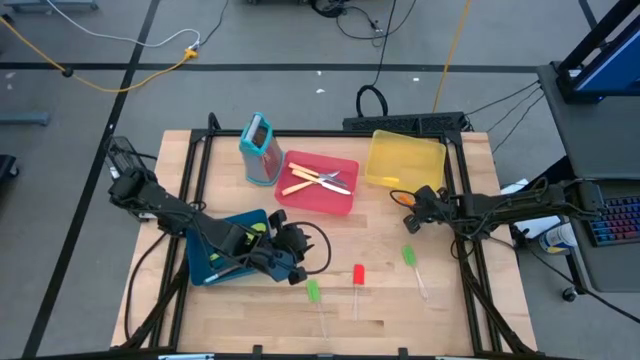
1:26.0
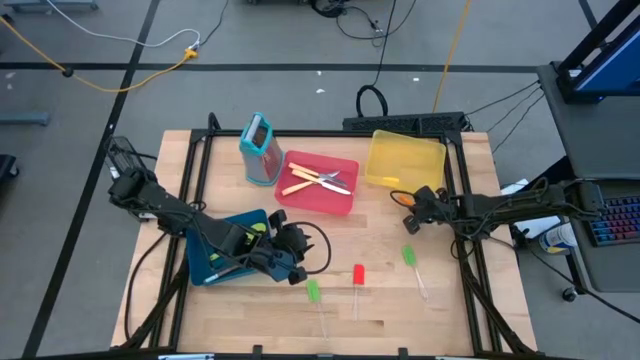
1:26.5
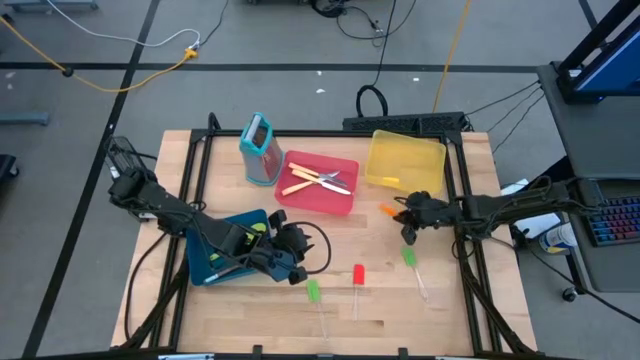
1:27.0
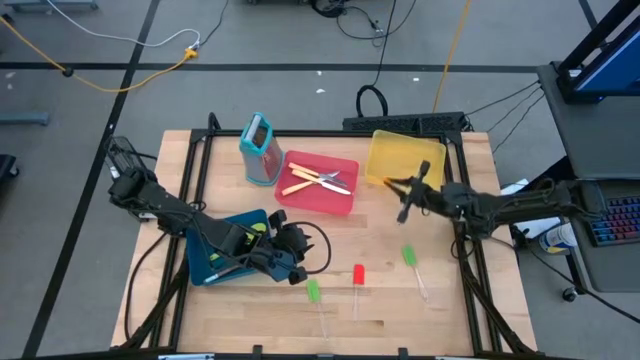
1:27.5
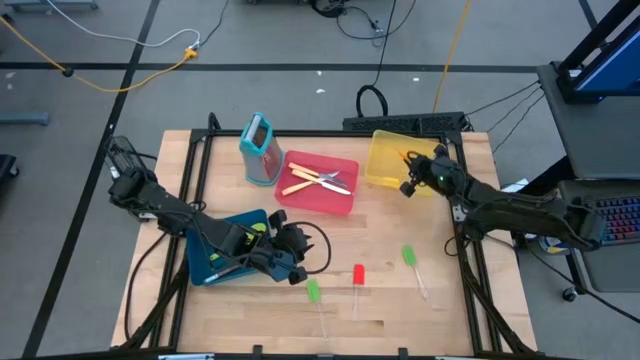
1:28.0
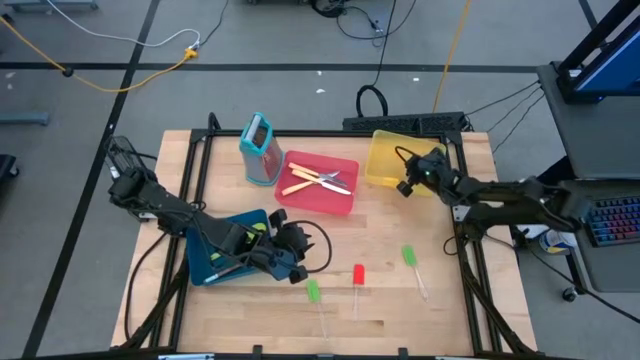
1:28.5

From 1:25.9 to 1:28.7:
Task: Pick & Place Kitchen Items
Put the orange spatula into the yellow bin

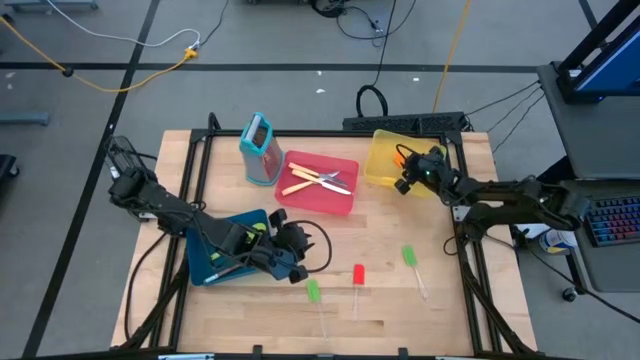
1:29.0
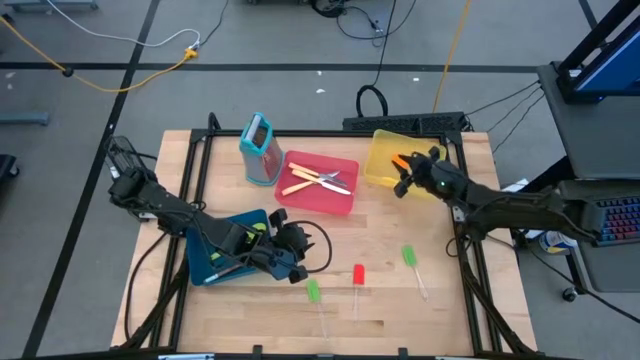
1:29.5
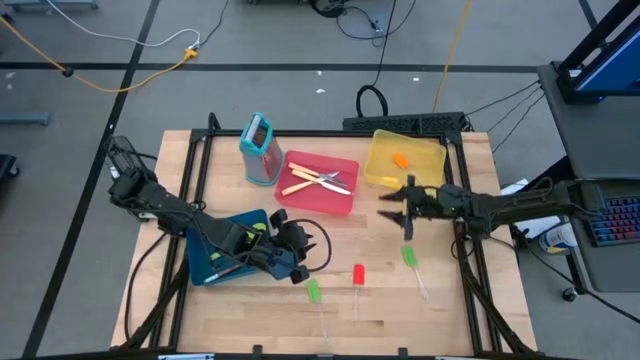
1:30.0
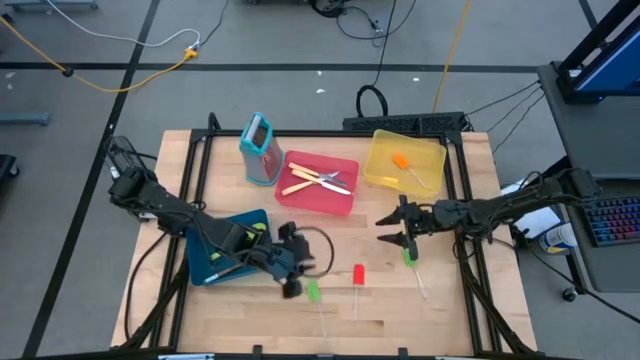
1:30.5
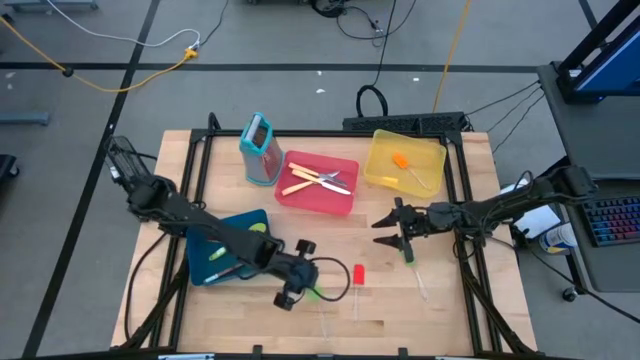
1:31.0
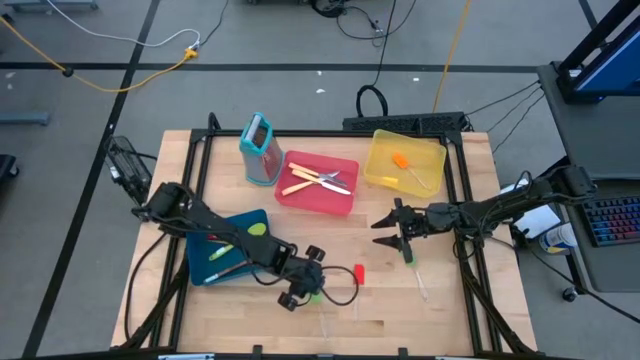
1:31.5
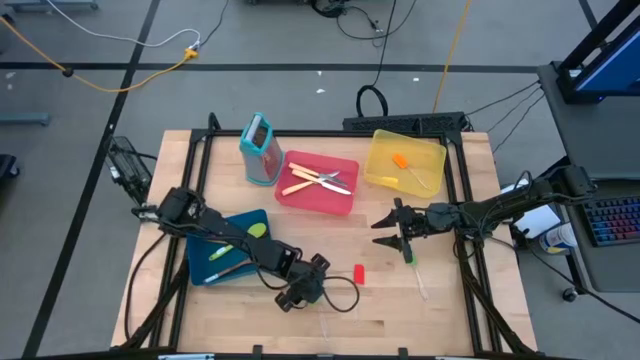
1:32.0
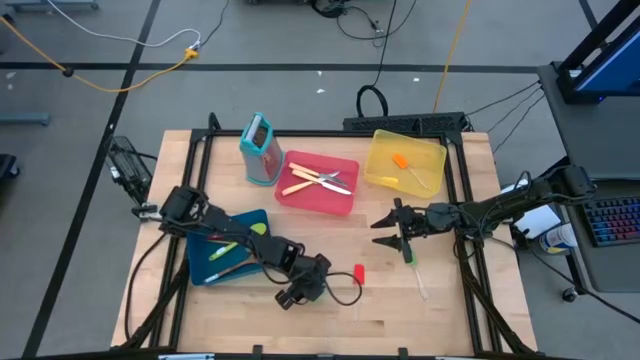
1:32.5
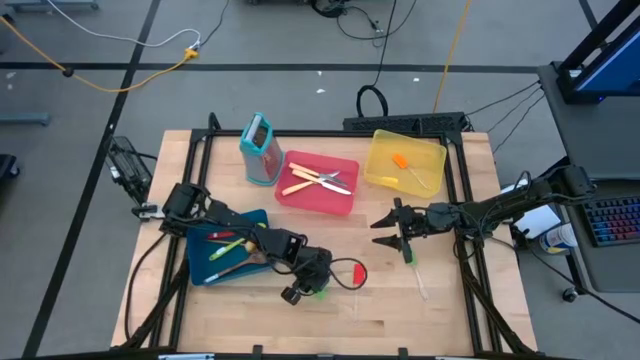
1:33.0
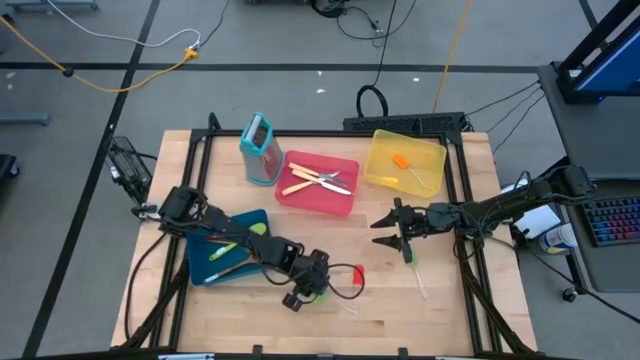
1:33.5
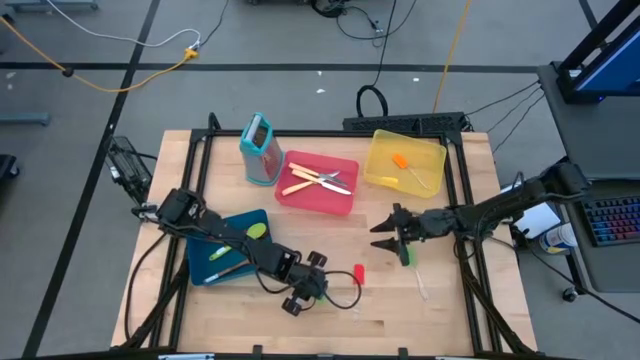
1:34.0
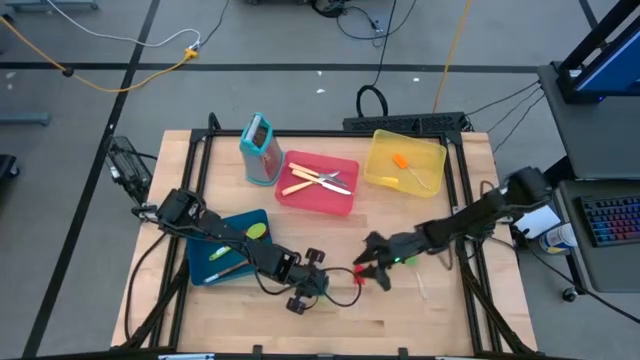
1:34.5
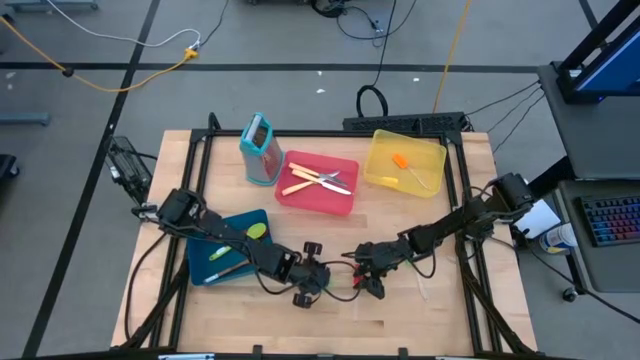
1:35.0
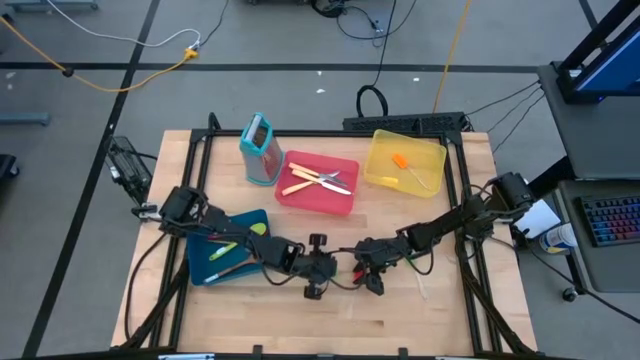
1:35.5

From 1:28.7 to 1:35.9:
Put the left green spatula into the yellow bin

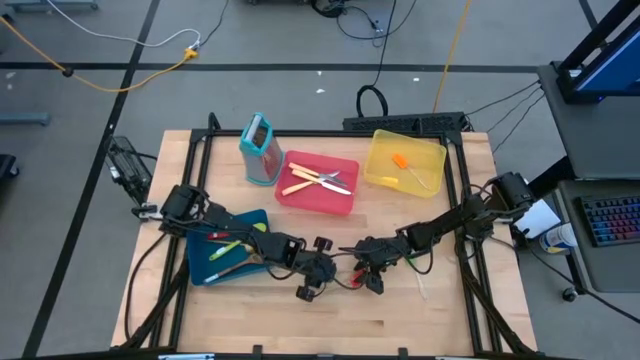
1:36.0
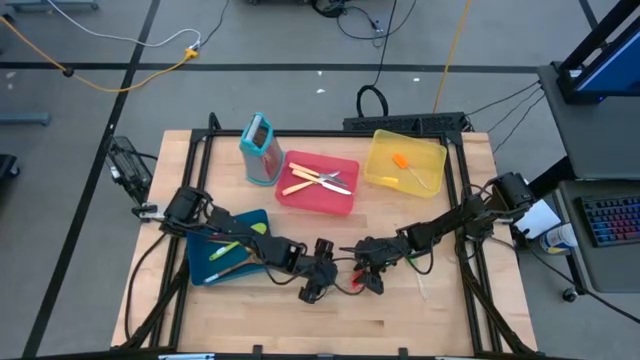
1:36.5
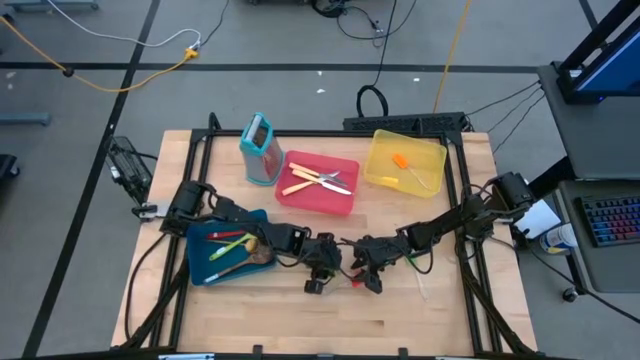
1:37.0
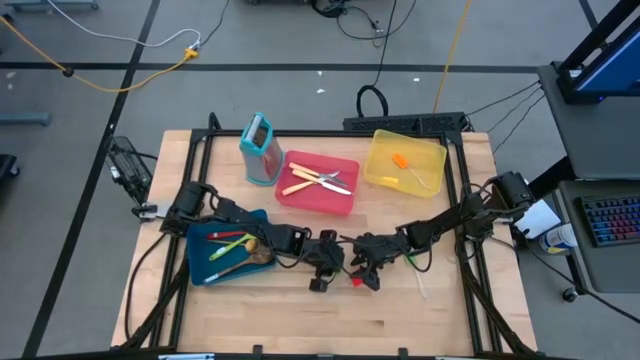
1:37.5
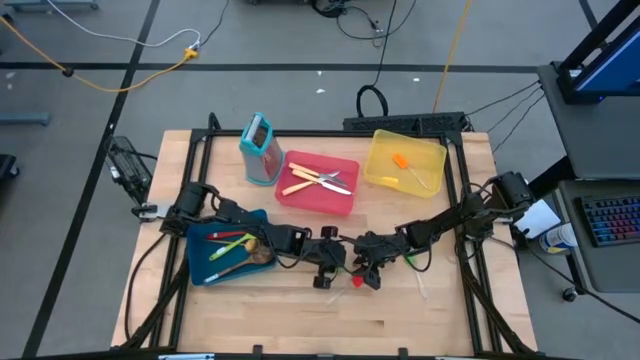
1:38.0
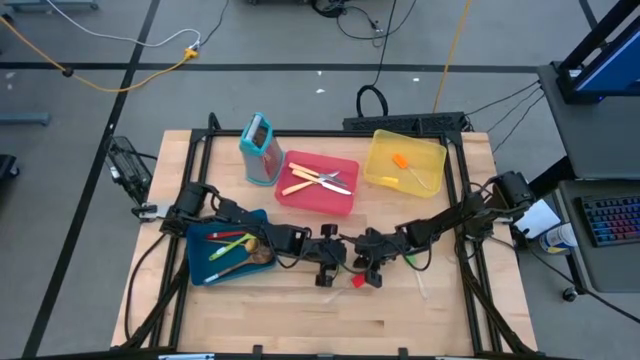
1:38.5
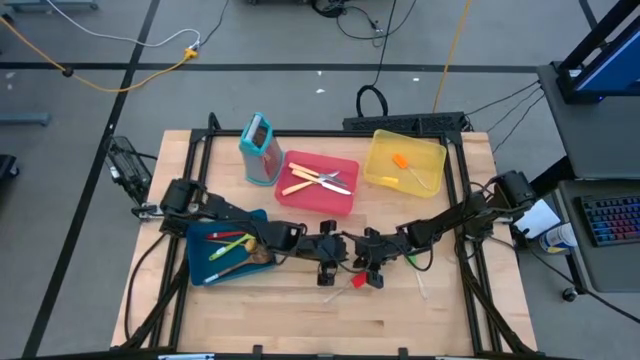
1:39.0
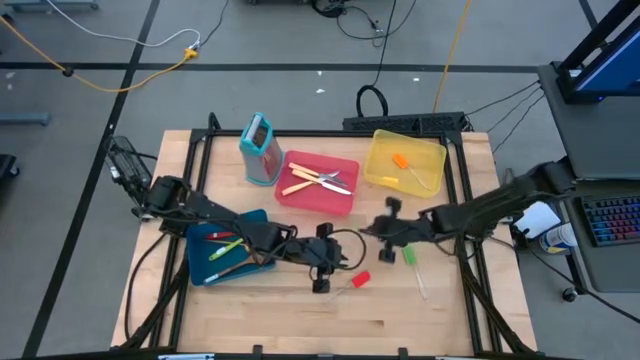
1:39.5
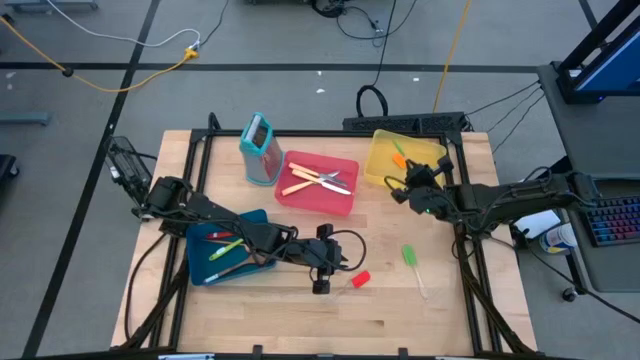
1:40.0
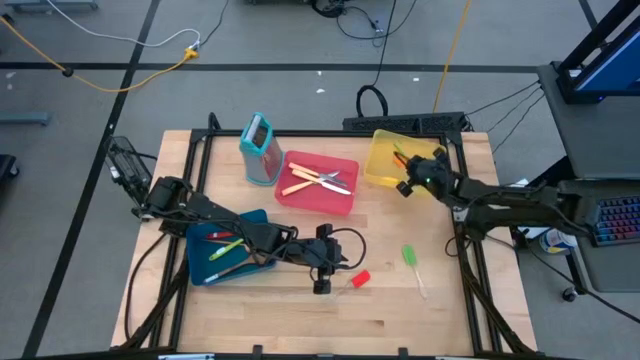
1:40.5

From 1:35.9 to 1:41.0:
Put the left green spatula into the yellow bin

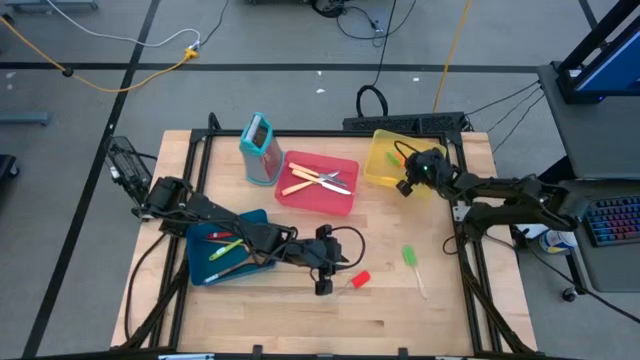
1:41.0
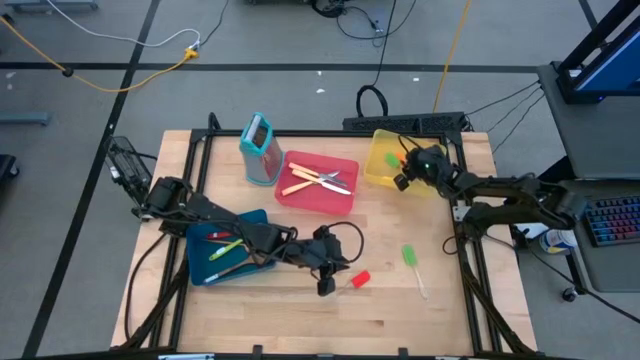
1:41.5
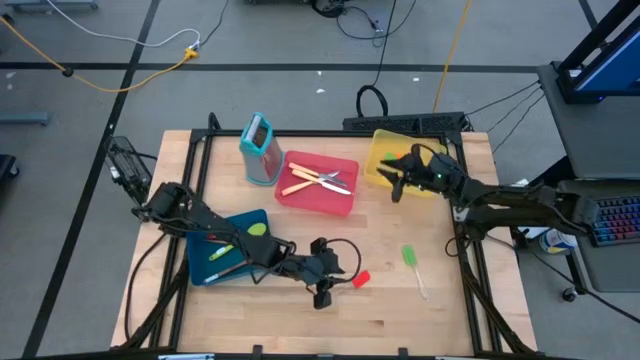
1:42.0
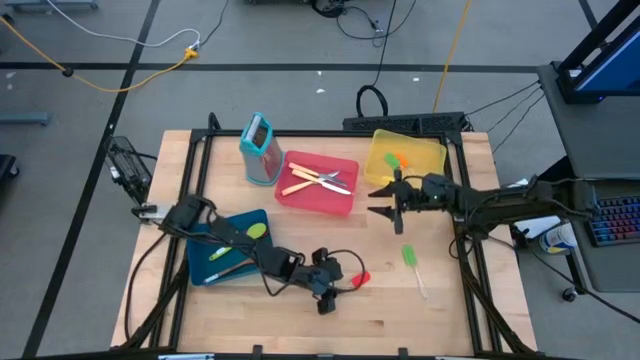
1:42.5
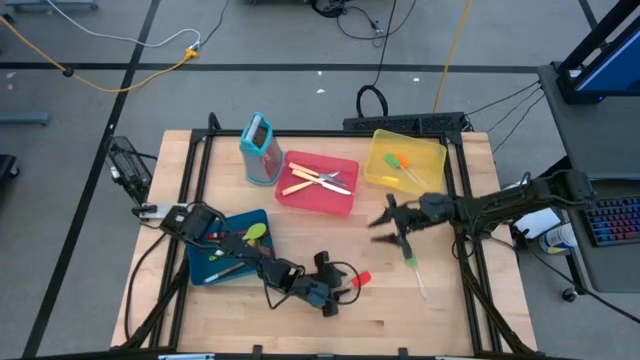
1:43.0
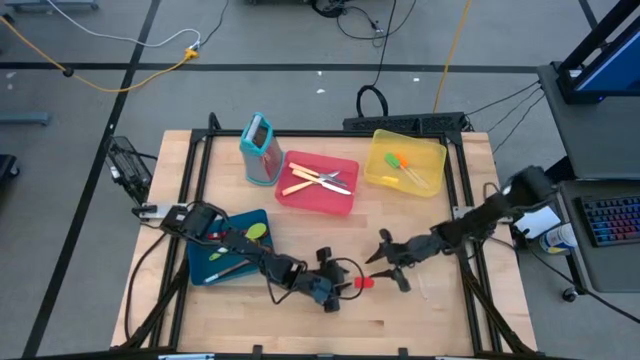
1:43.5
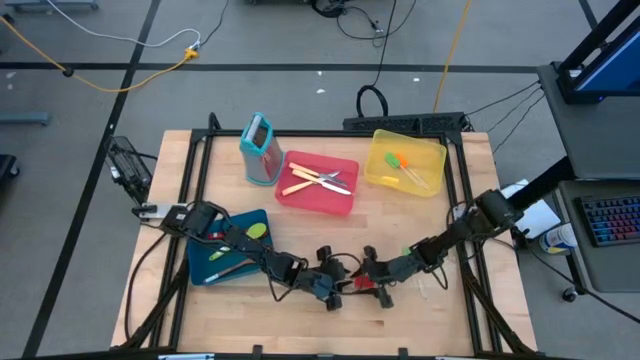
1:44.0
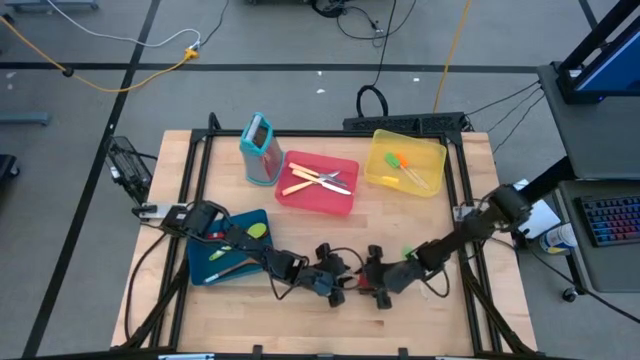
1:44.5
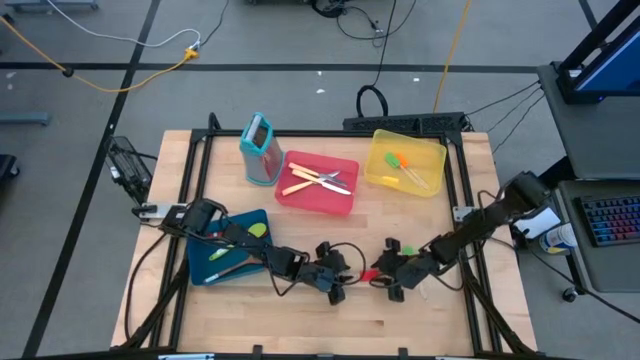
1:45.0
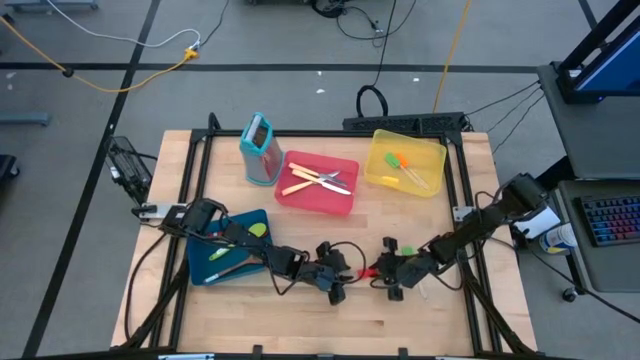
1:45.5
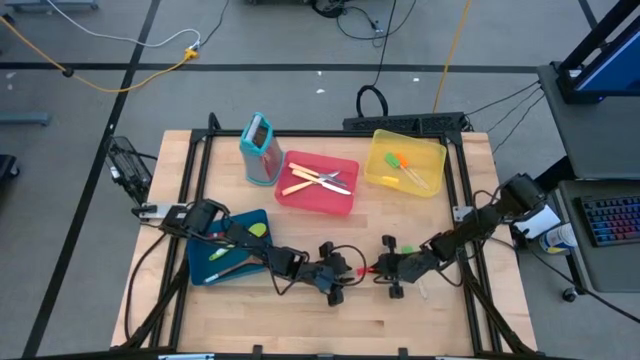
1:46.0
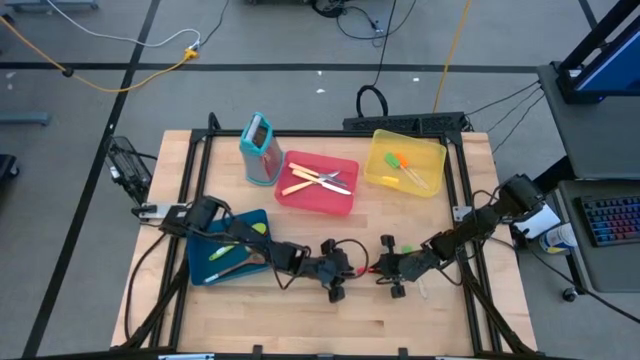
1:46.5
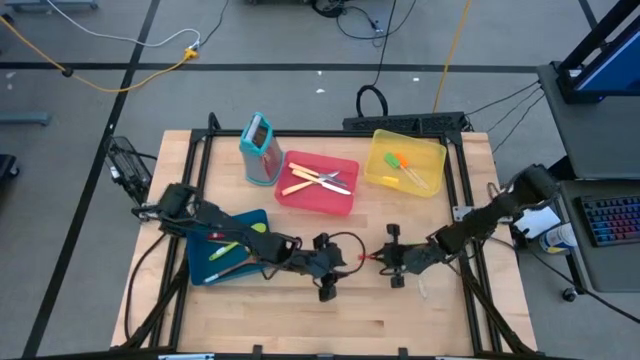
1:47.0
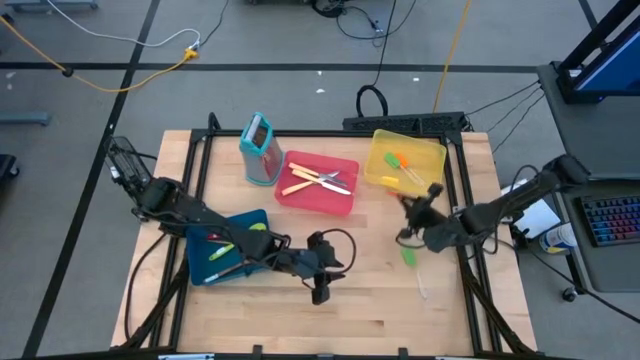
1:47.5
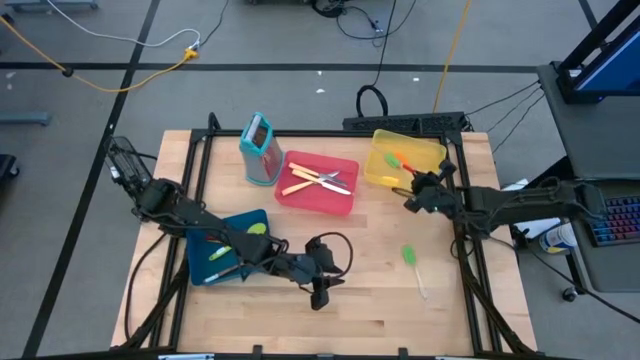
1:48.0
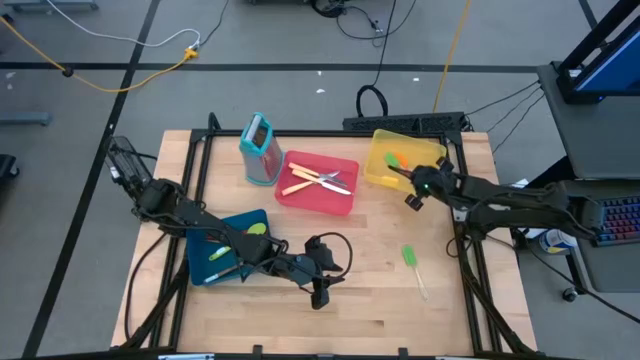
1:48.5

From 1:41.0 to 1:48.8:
Put the red spatula into the yellow bin
